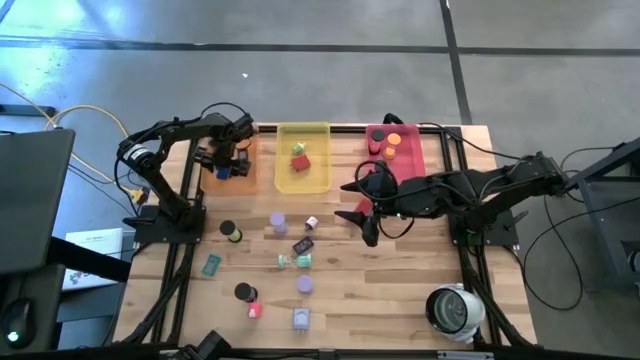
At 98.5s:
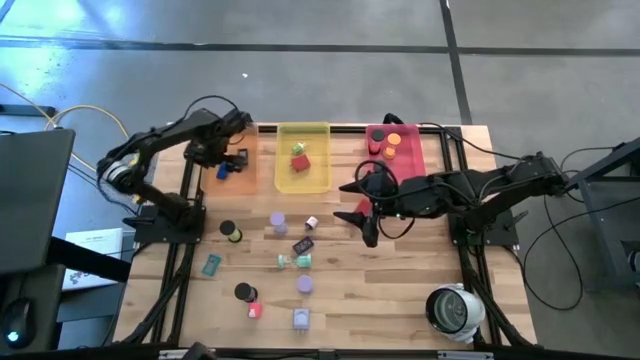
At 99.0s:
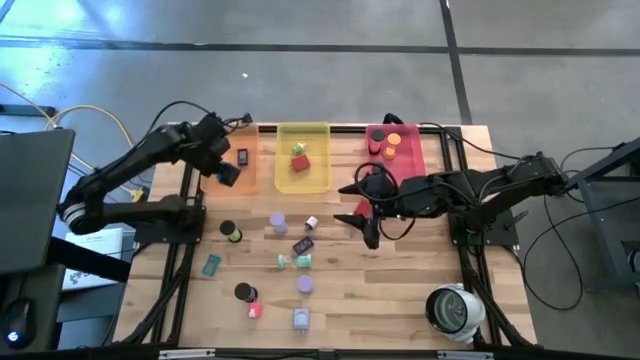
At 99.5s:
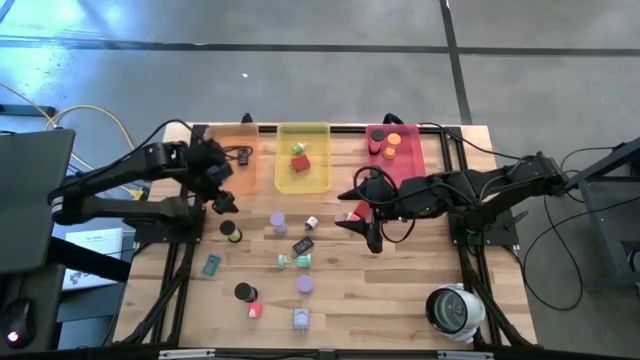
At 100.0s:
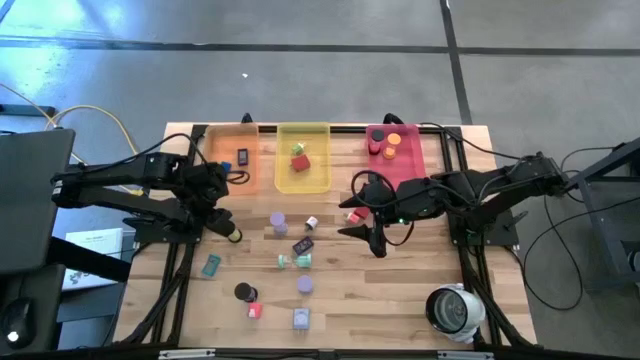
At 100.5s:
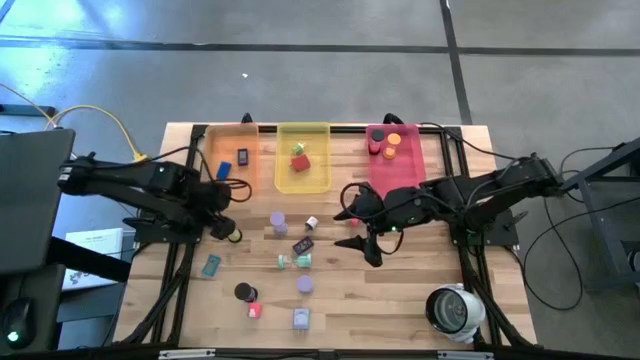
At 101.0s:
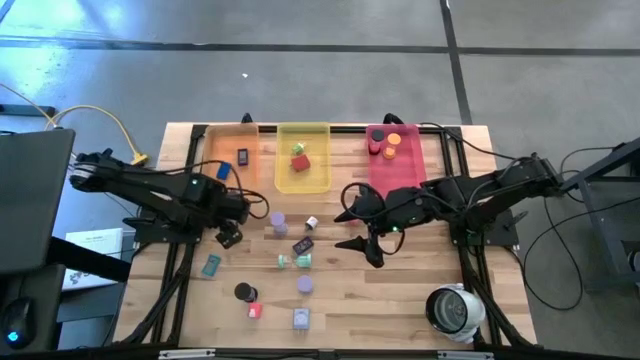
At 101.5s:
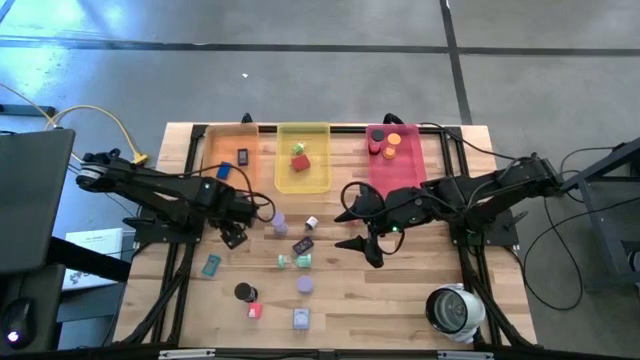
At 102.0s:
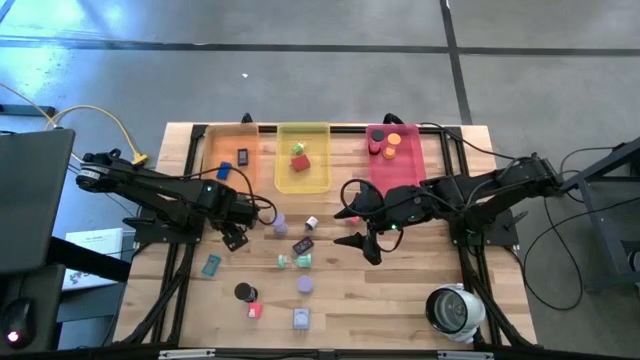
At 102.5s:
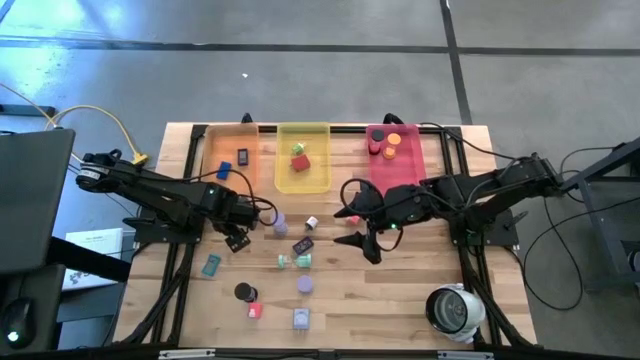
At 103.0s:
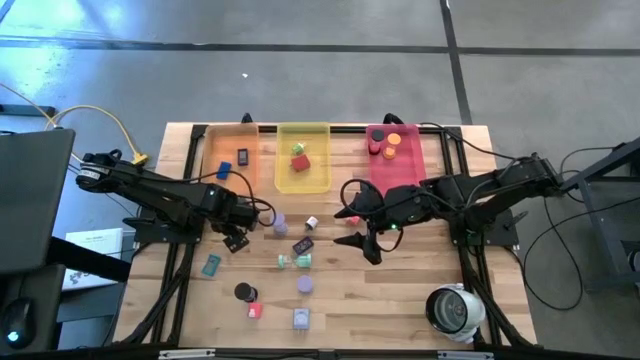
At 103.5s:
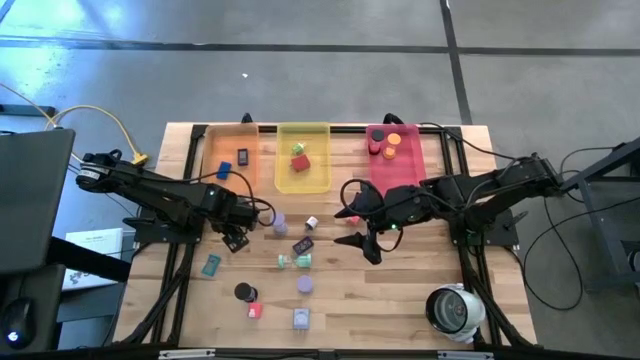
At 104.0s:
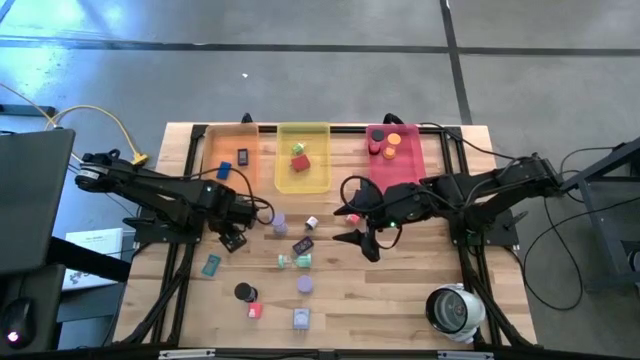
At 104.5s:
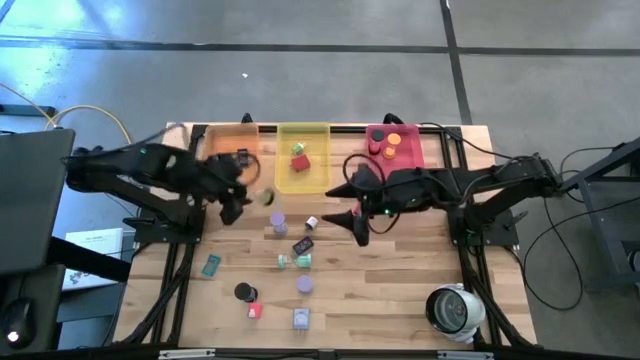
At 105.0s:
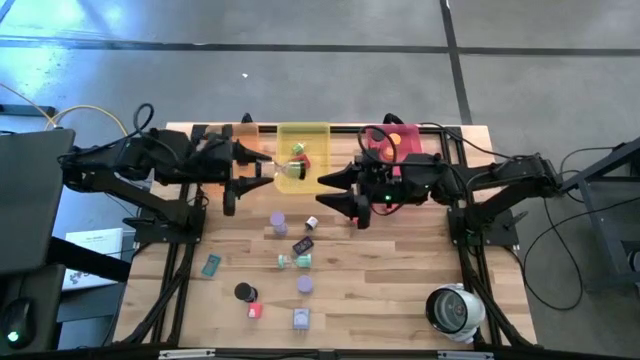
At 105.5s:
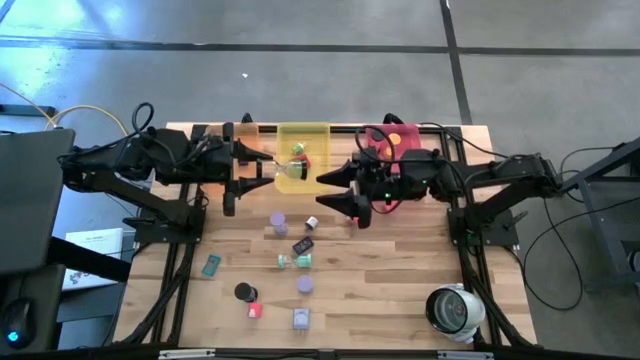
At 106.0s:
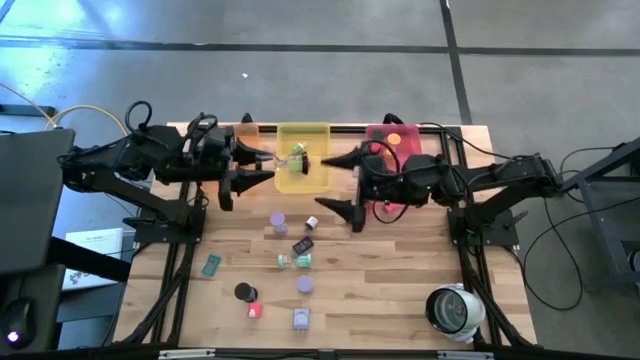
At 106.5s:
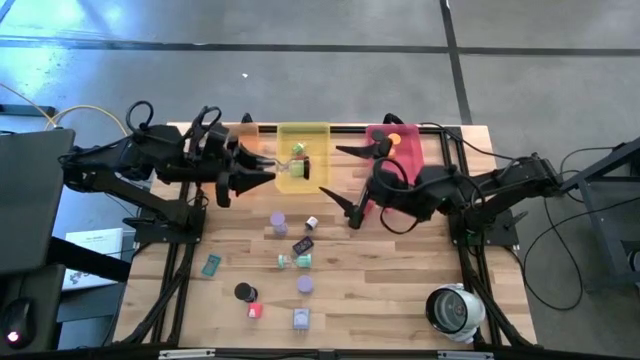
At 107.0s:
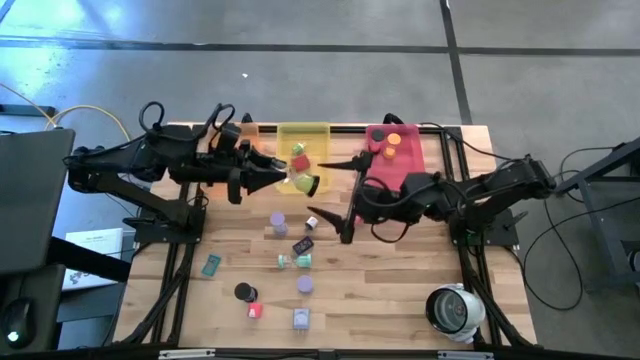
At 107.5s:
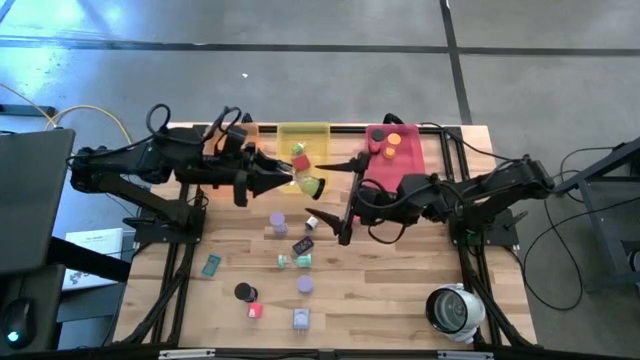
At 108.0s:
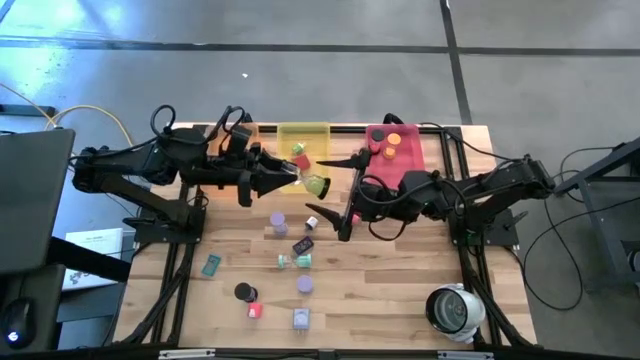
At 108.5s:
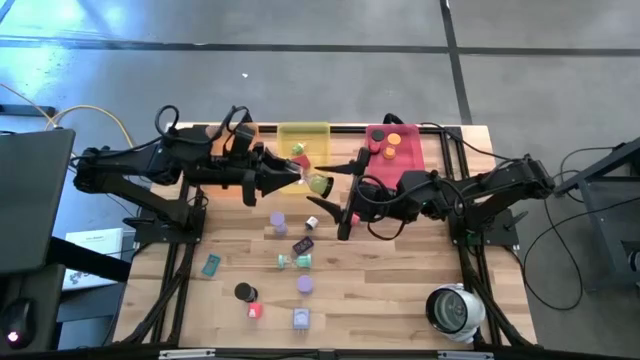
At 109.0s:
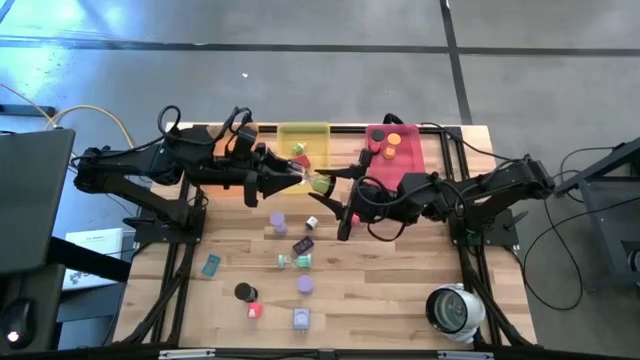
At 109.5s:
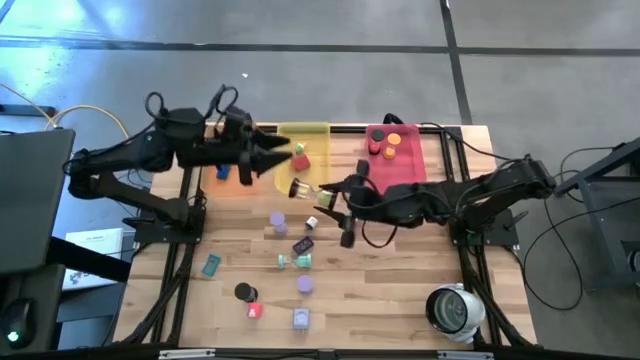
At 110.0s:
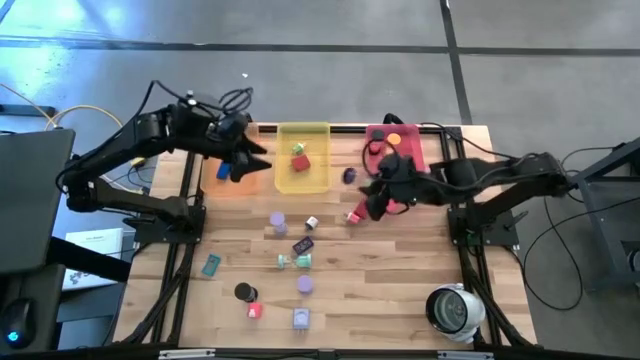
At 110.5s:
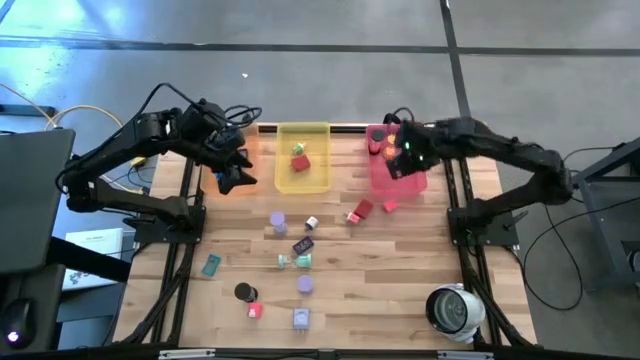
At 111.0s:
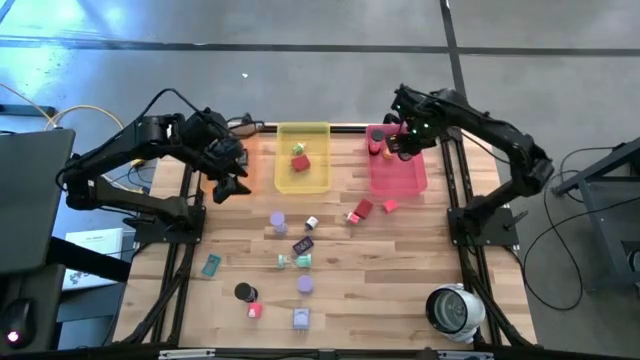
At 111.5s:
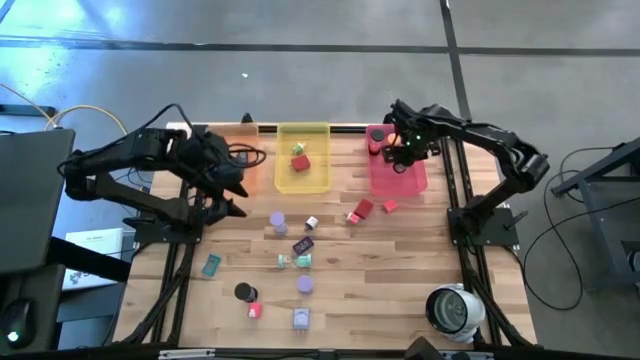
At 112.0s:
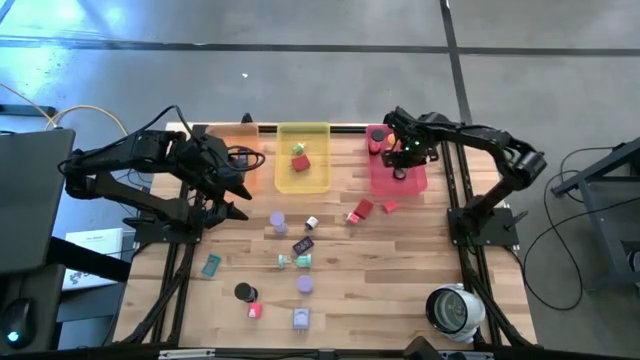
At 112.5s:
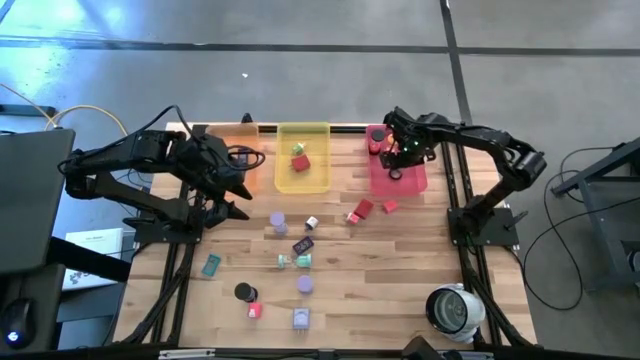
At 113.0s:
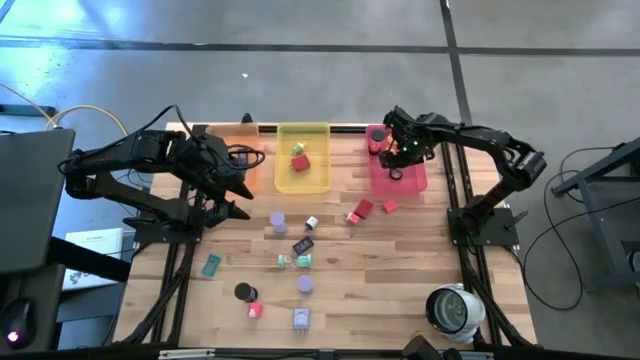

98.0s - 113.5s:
Task: Pick & Place Office items
Put the green sand timer into the pink bin
